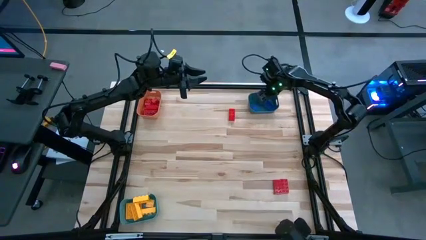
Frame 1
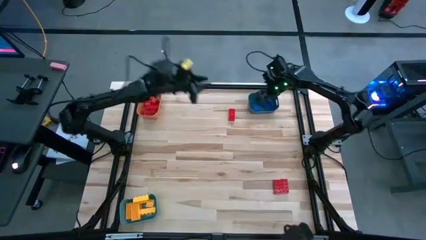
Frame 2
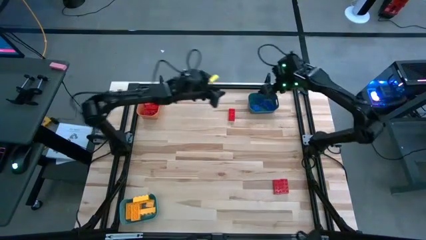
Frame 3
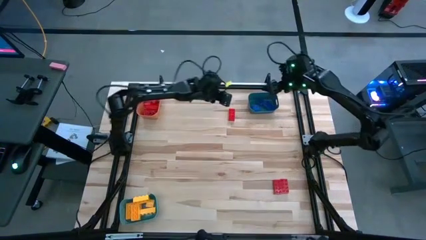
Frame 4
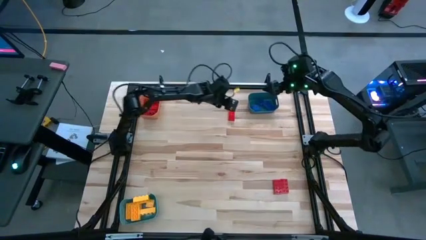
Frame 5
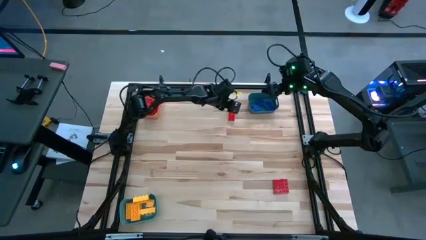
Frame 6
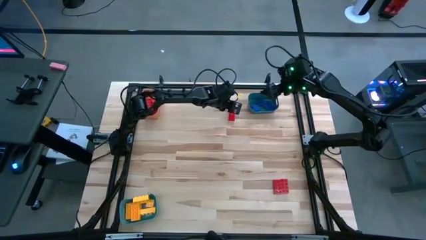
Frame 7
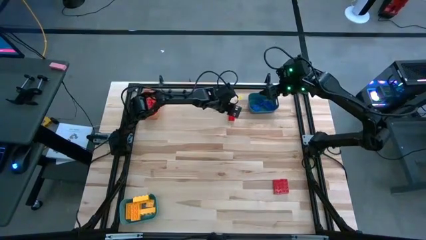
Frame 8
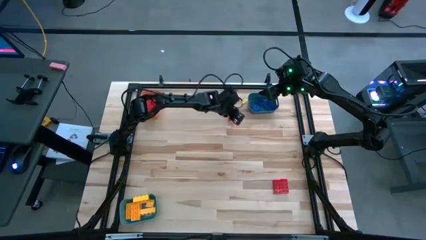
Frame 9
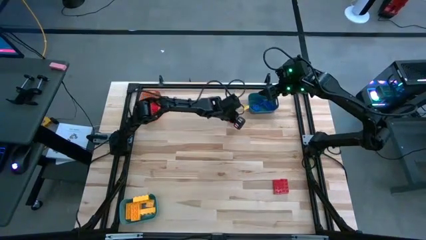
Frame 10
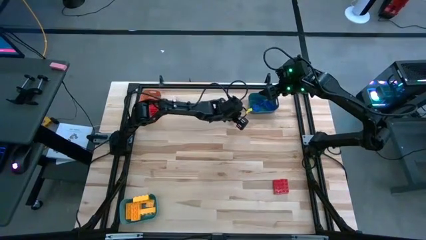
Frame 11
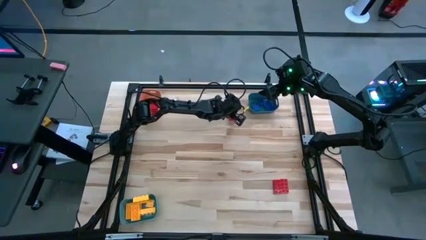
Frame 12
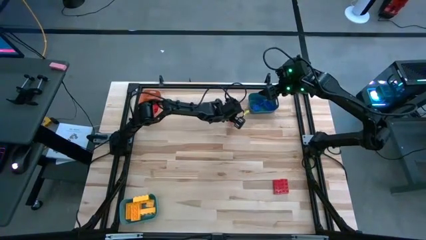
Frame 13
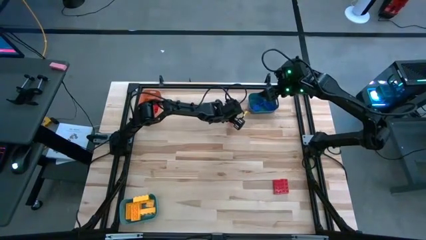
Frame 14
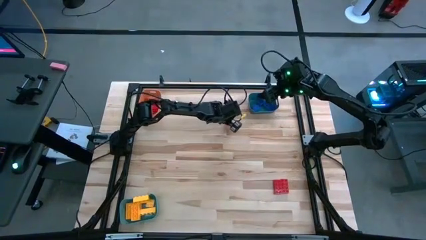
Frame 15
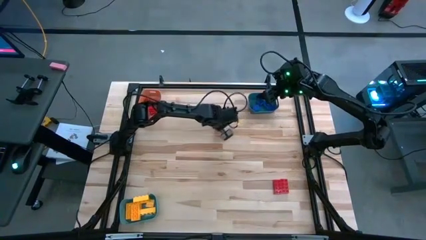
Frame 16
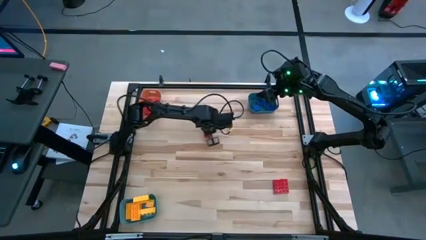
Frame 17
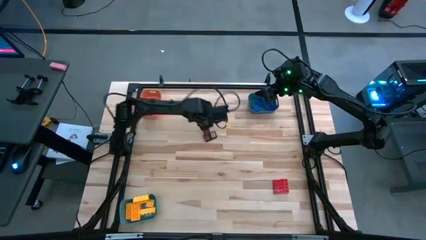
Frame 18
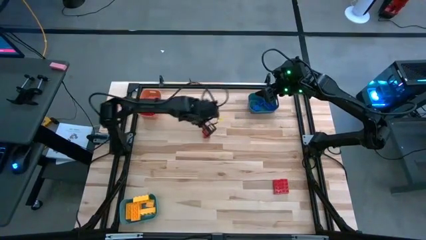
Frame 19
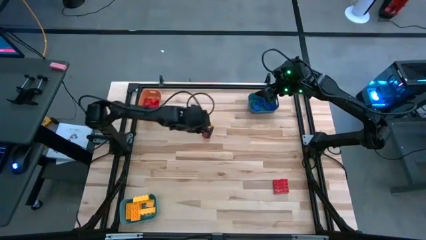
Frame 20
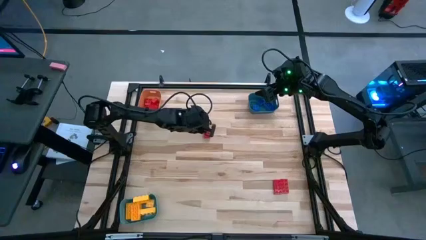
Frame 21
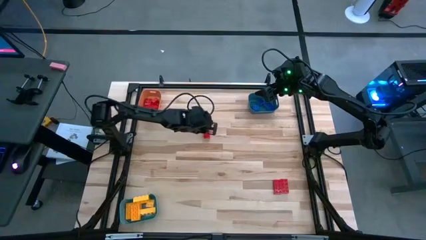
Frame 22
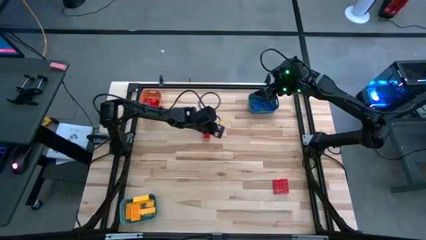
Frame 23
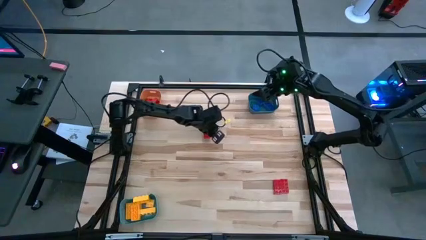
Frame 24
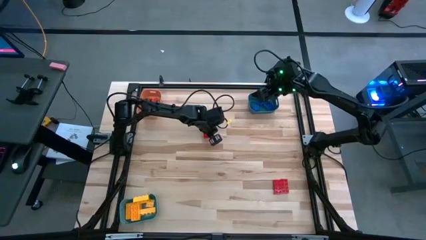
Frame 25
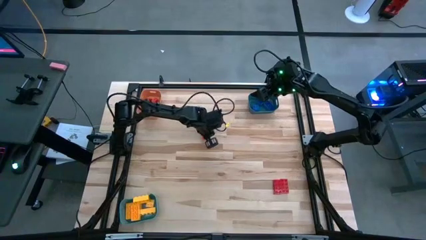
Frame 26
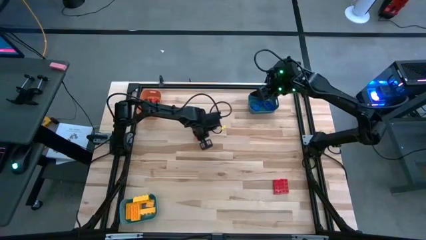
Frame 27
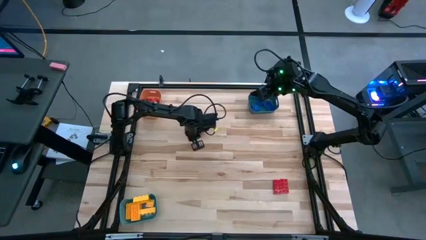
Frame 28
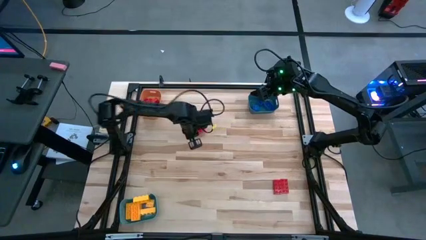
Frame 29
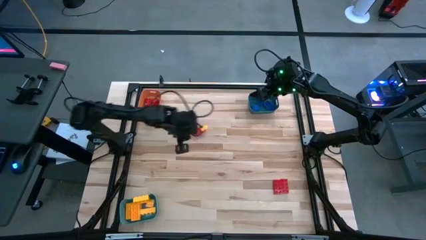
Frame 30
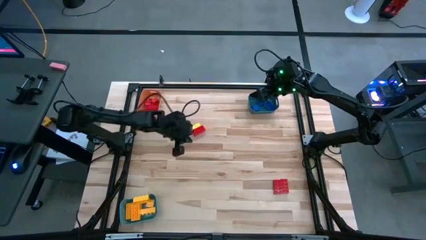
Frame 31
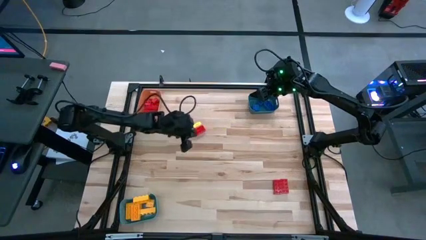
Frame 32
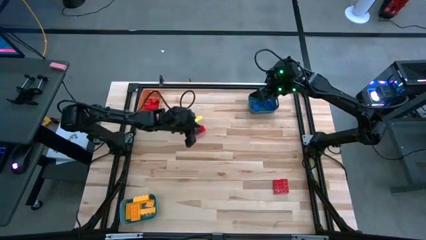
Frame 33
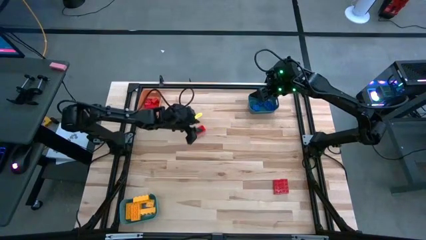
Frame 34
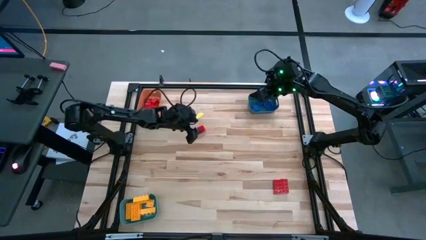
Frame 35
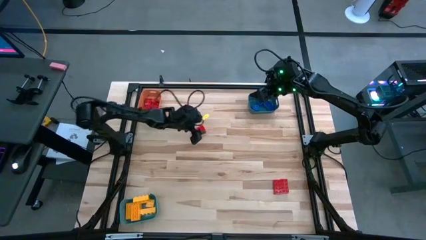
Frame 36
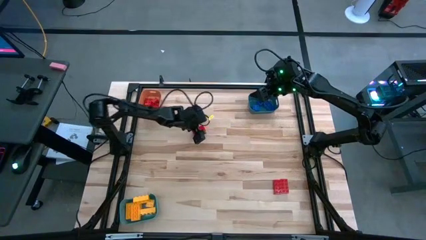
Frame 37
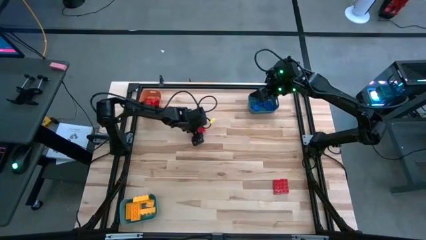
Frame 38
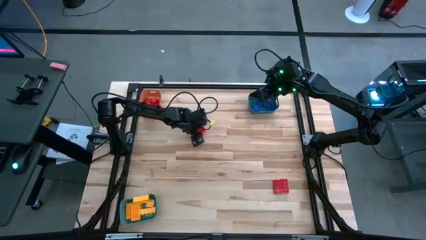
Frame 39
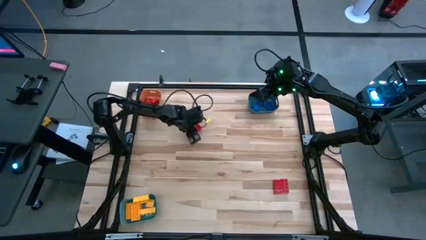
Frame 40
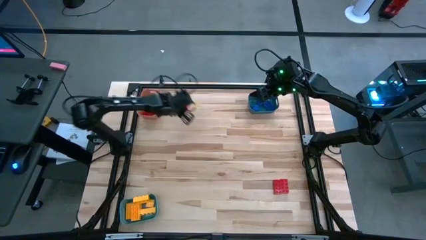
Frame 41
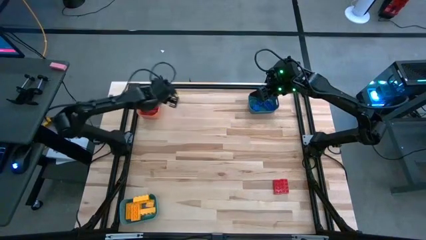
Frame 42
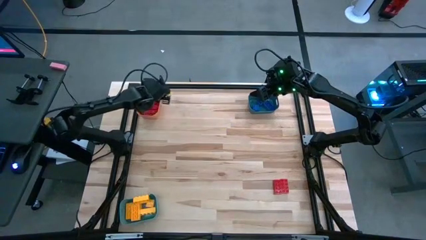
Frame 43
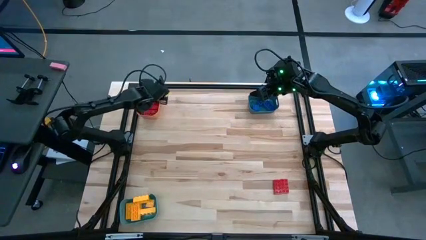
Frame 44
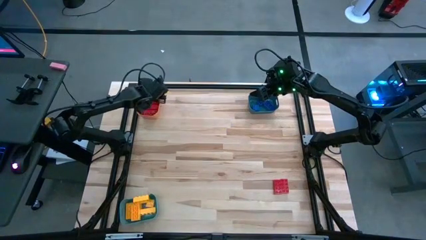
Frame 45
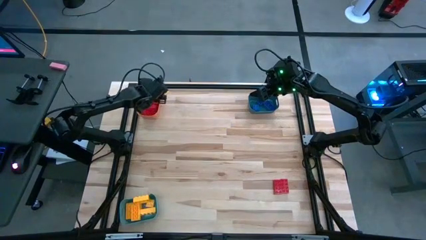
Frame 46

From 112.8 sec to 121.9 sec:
Task: Sort blocks
Put the red game piece into the orange bin

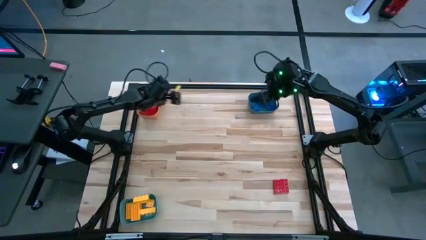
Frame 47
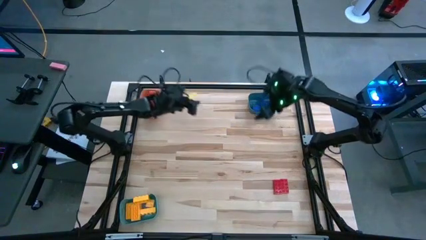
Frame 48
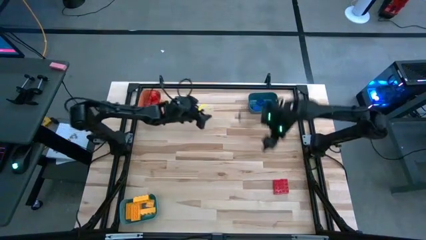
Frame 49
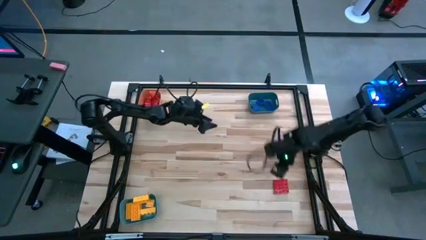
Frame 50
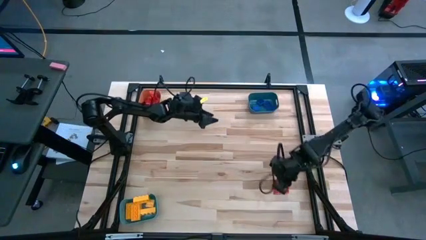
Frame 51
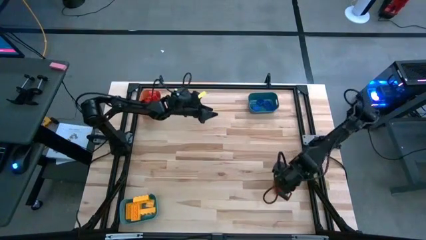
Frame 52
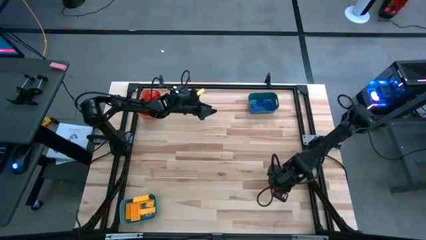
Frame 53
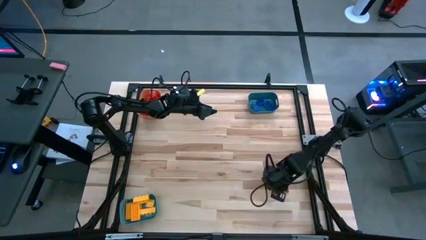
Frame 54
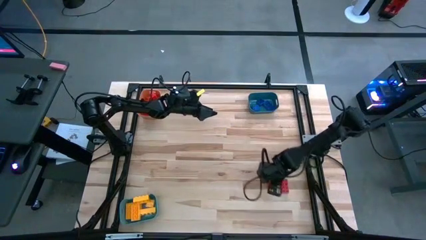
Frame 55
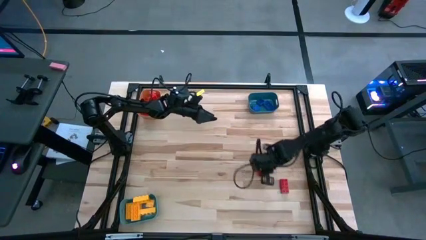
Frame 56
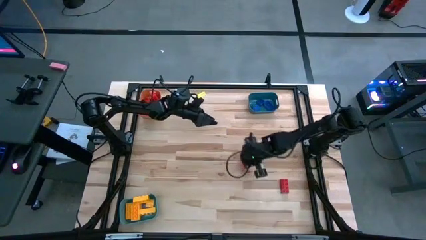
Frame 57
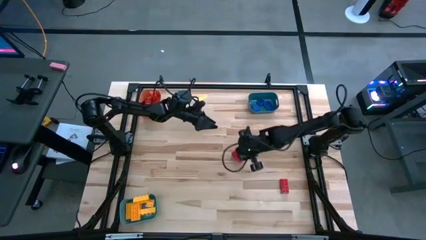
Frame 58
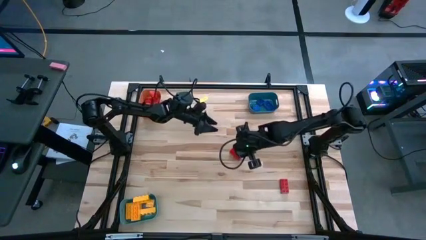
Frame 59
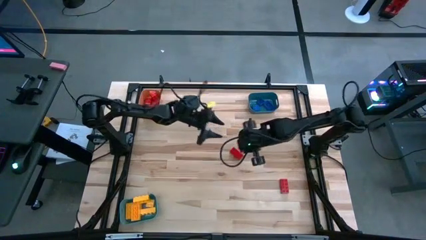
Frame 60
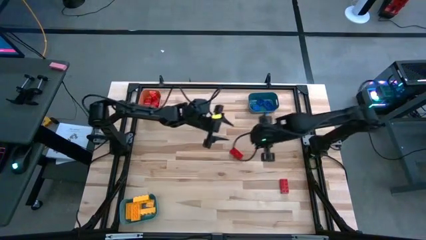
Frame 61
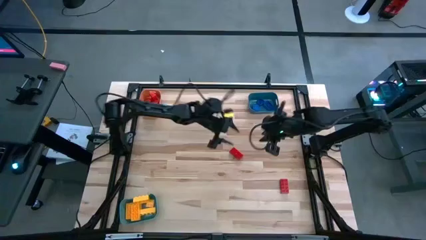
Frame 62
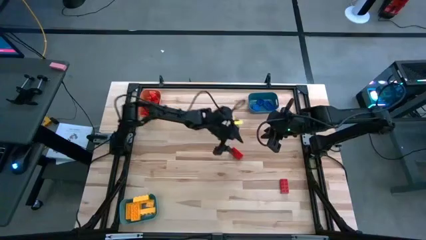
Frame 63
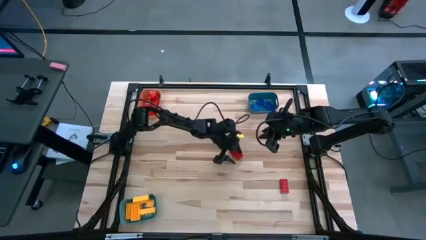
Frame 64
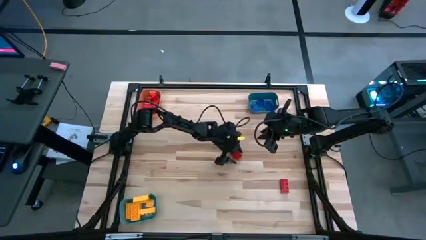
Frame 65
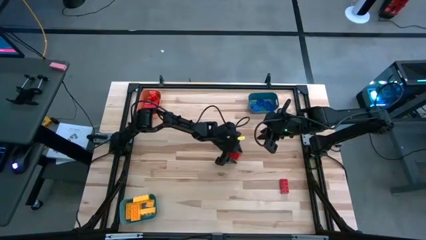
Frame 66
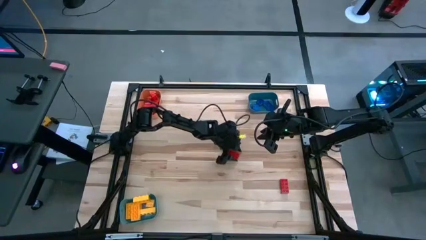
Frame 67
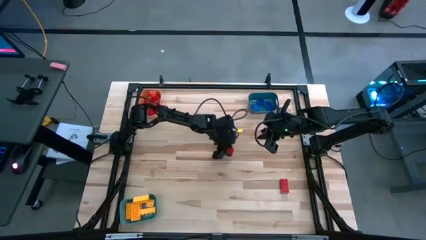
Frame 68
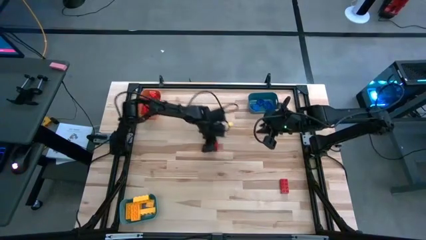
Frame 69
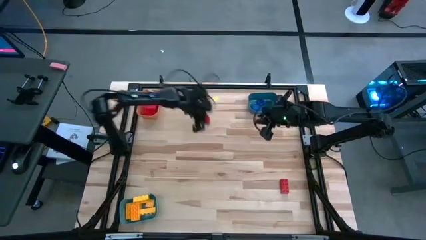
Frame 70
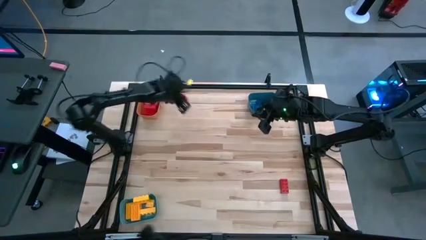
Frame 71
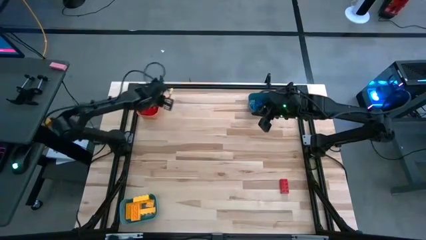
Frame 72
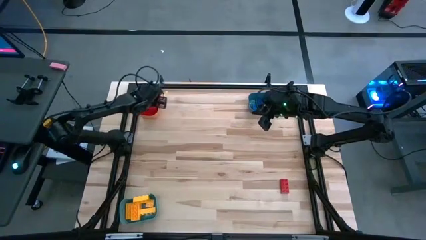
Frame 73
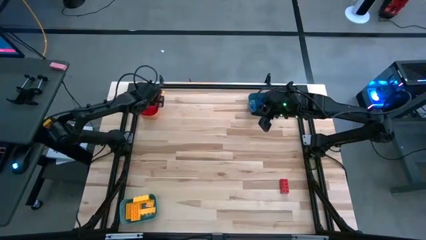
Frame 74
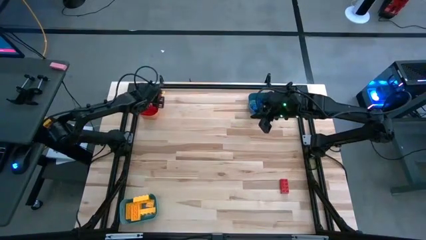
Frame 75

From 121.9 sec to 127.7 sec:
Put the red game piece into the orange bin
